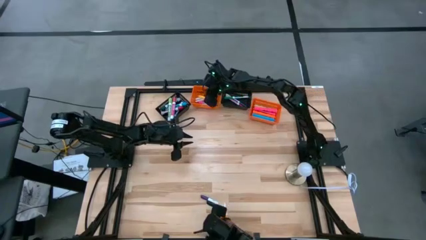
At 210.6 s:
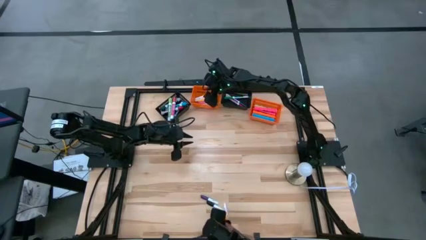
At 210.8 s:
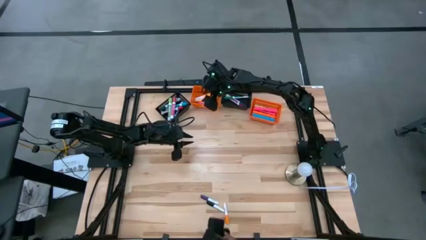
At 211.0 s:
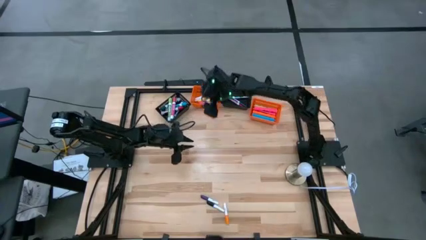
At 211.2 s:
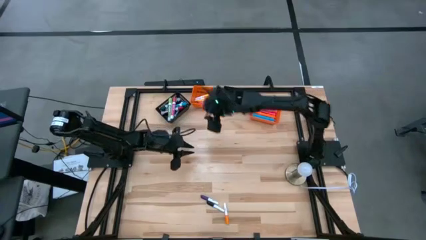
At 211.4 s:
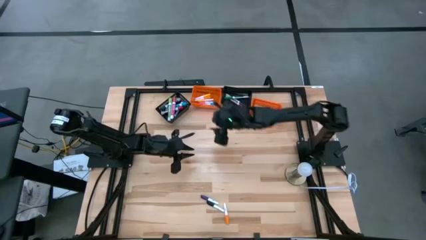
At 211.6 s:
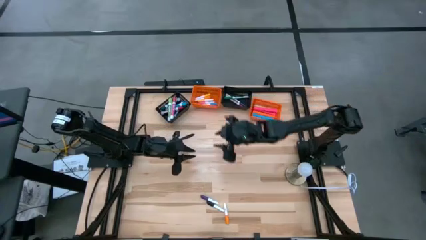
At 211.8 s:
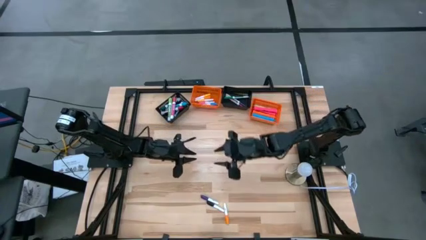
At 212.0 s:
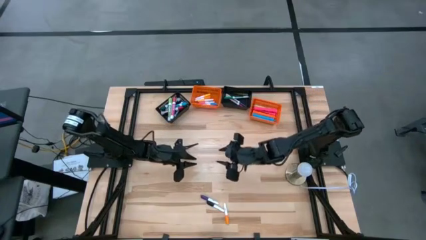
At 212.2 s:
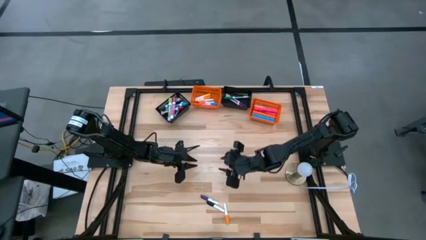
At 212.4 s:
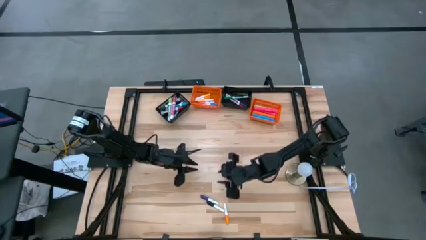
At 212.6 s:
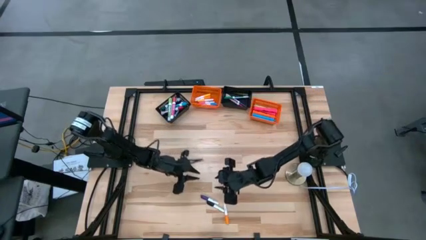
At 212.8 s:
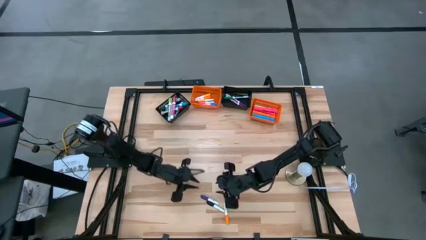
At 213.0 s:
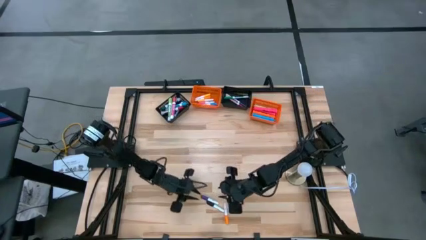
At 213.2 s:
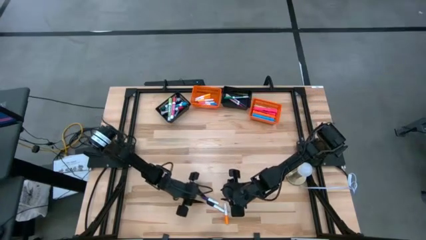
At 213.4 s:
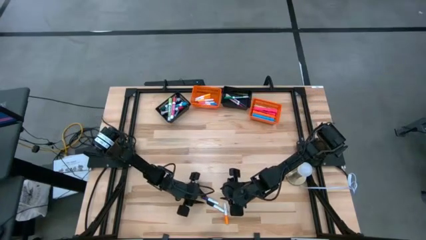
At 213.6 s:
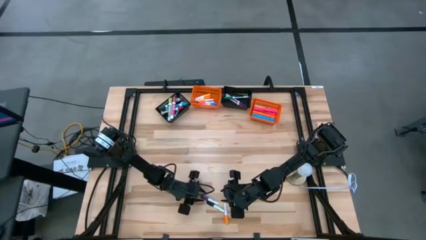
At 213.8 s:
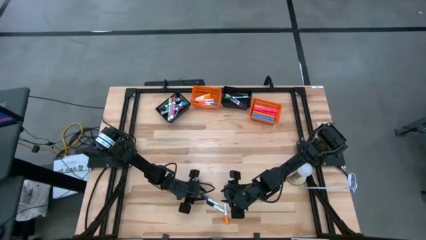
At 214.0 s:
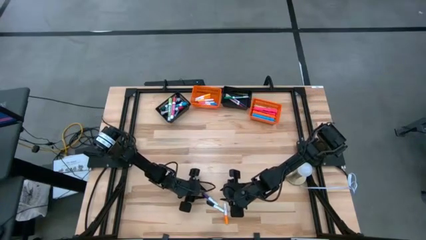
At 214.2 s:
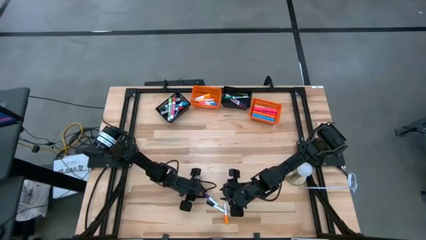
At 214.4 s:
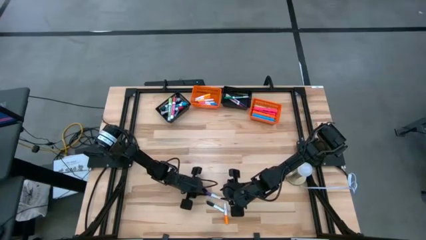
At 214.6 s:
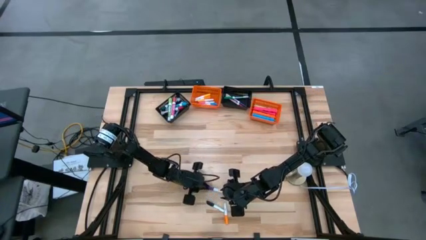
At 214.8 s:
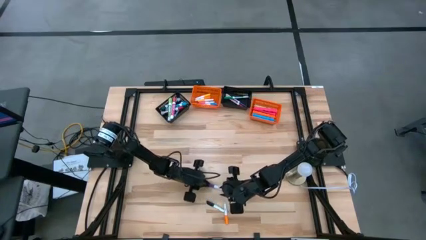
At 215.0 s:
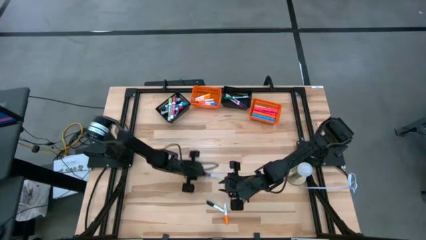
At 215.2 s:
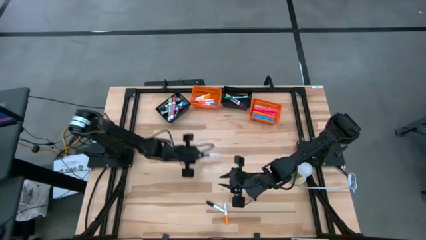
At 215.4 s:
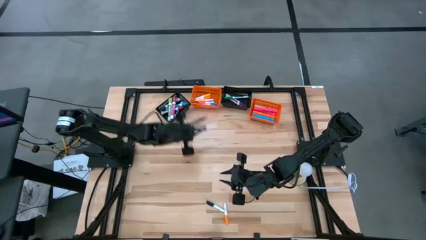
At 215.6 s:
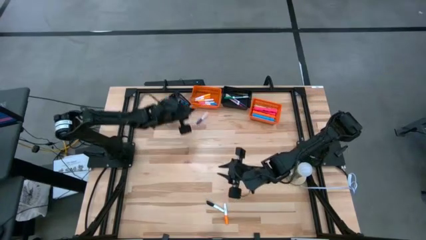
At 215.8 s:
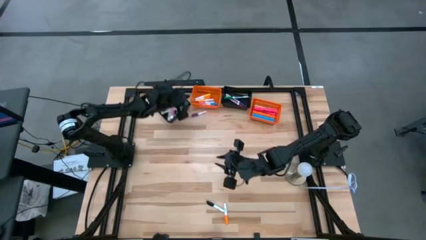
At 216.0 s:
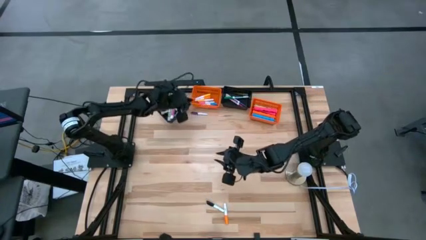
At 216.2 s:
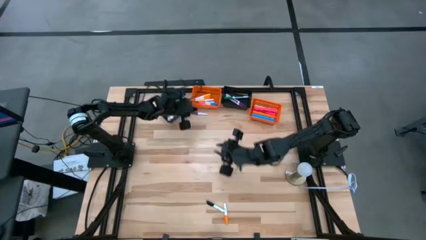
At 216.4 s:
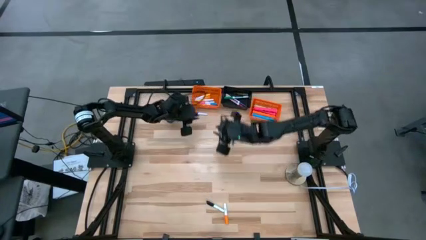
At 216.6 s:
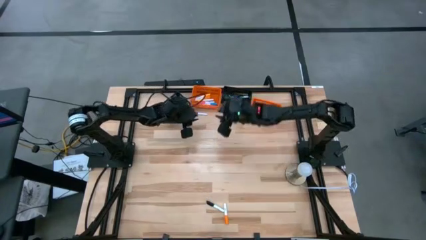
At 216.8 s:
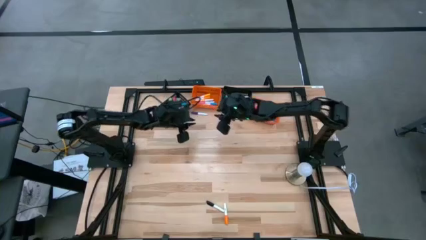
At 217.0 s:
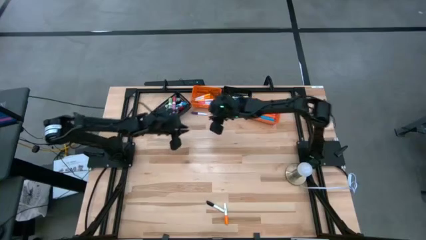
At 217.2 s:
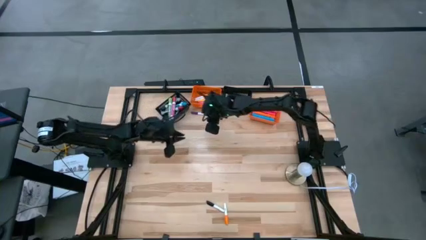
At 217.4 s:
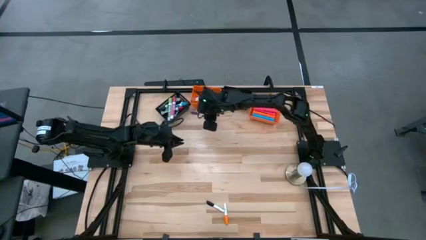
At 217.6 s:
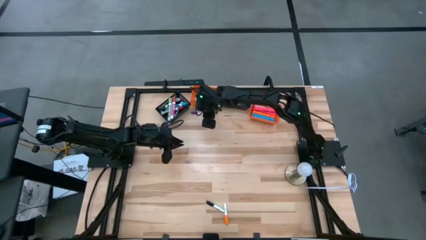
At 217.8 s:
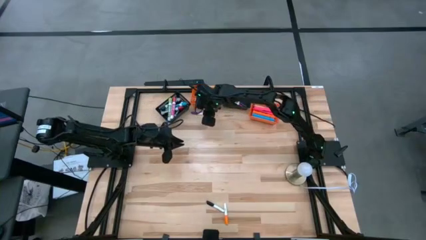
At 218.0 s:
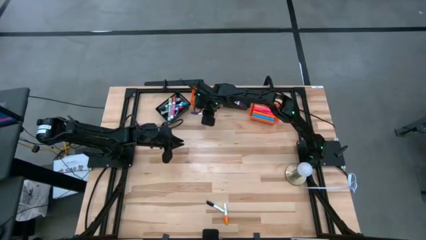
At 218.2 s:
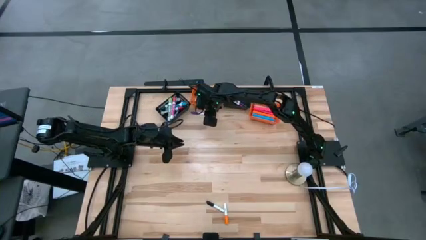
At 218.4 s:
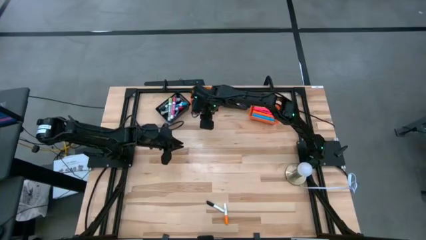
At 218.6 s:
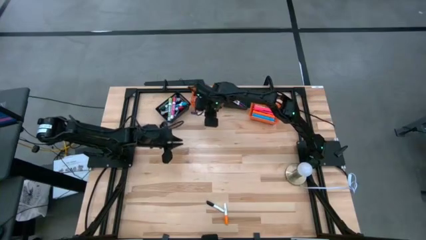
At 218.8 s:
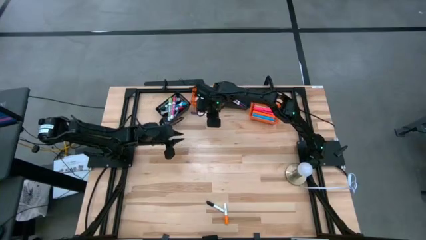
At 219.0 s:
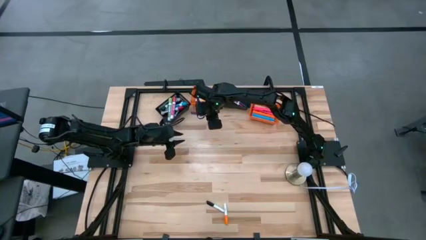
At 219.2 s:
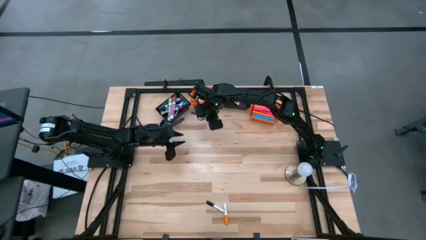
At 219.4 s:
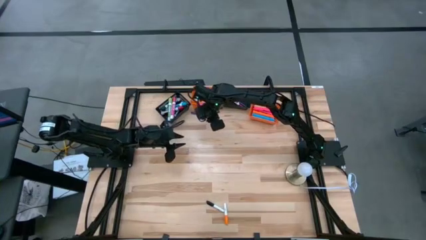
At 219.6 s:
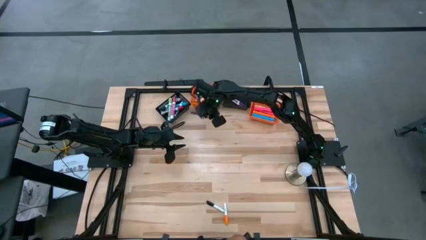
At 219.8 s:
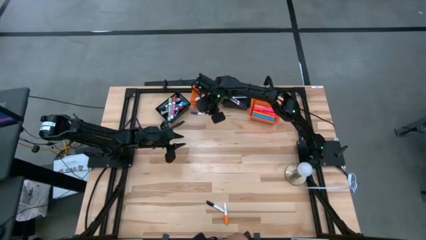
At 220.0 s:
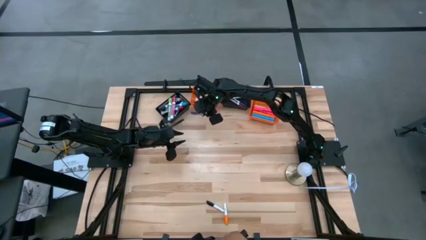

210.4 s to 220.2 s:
Task: Pick & Place Markers
Put the small purple highlighter into the left orange bin

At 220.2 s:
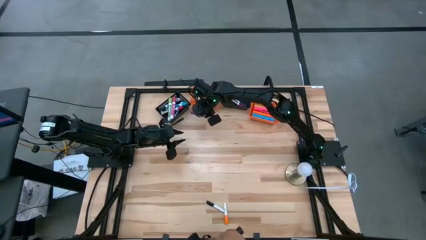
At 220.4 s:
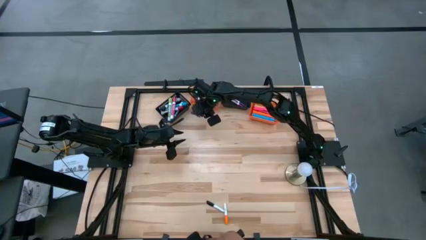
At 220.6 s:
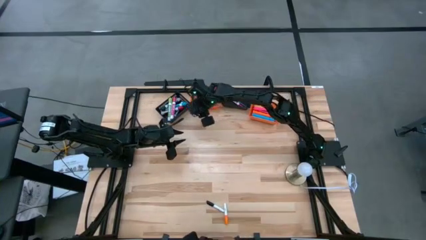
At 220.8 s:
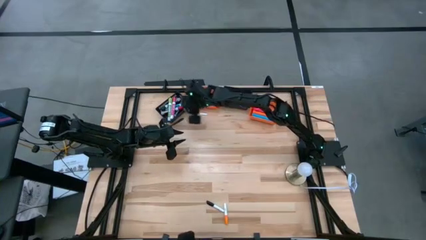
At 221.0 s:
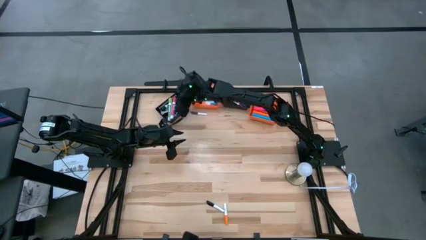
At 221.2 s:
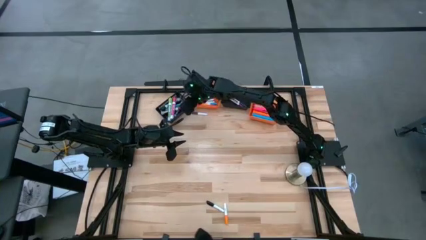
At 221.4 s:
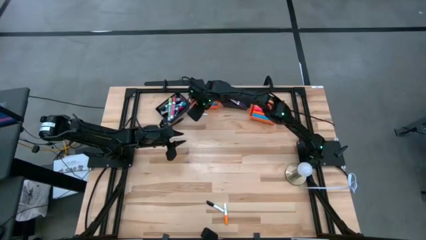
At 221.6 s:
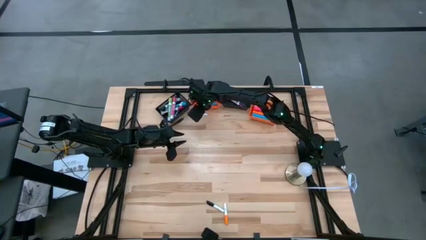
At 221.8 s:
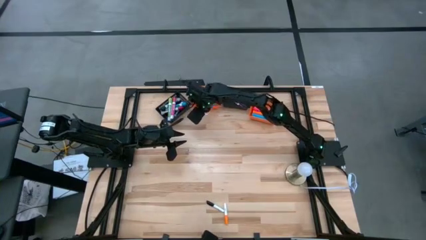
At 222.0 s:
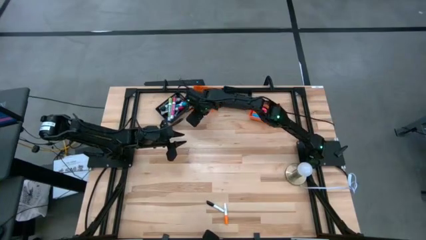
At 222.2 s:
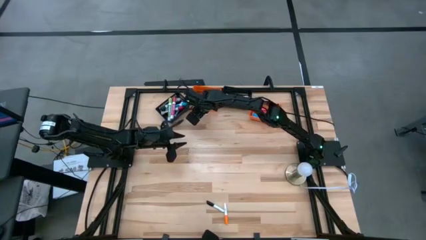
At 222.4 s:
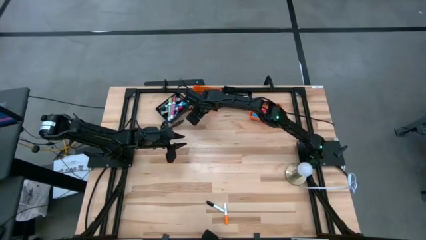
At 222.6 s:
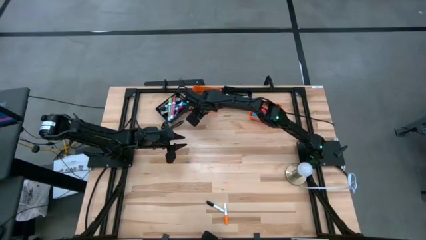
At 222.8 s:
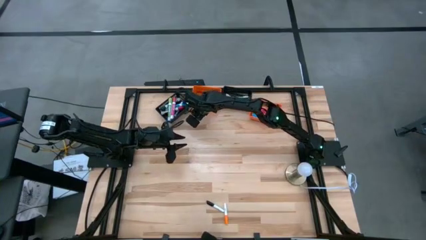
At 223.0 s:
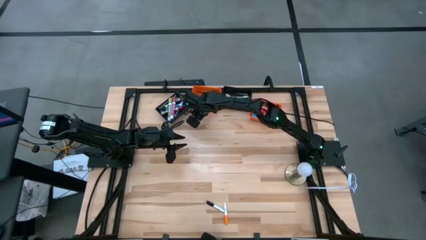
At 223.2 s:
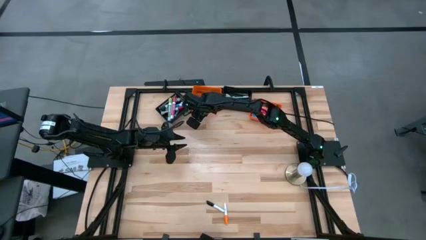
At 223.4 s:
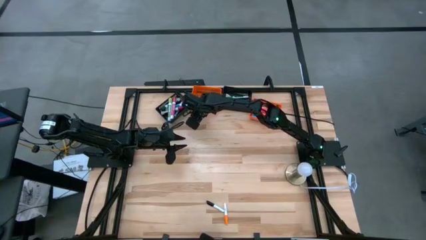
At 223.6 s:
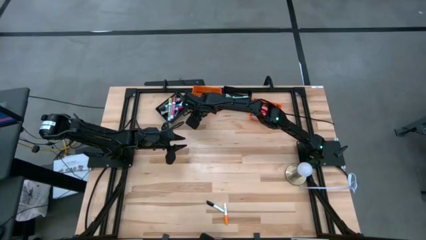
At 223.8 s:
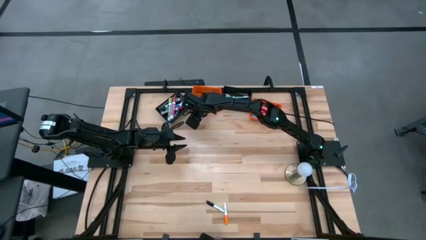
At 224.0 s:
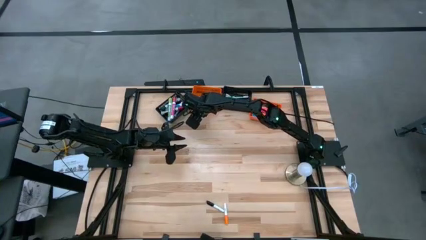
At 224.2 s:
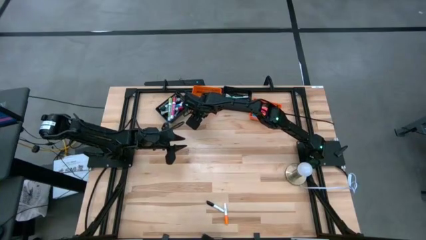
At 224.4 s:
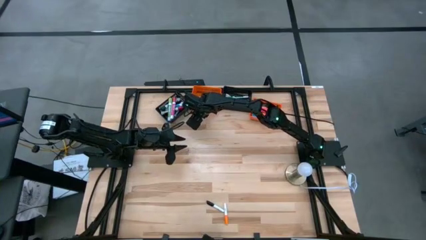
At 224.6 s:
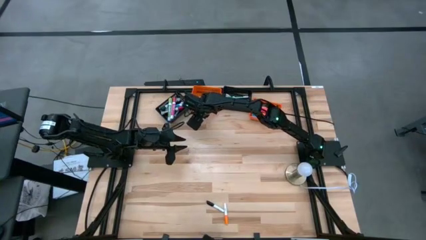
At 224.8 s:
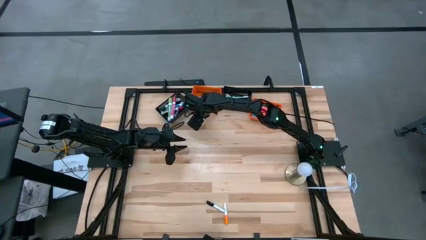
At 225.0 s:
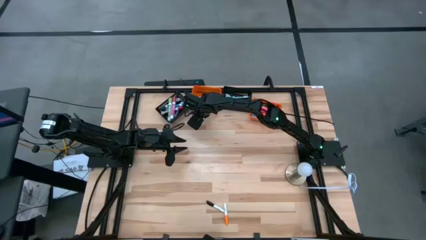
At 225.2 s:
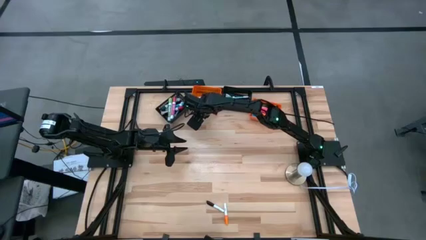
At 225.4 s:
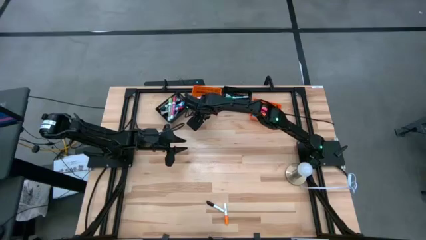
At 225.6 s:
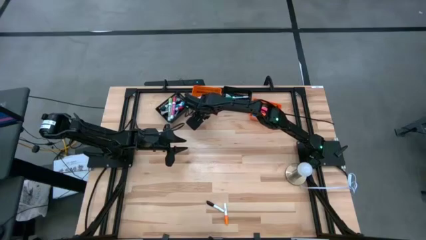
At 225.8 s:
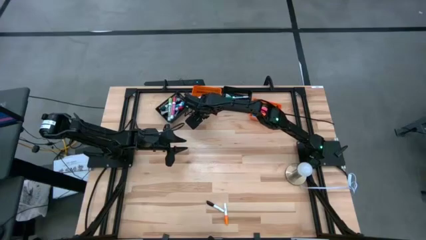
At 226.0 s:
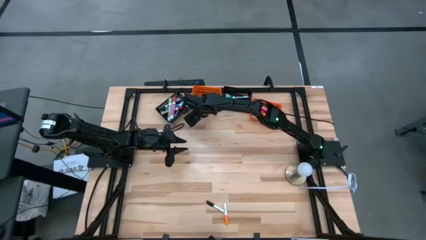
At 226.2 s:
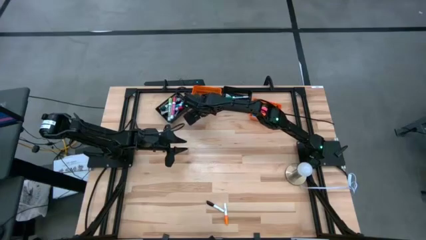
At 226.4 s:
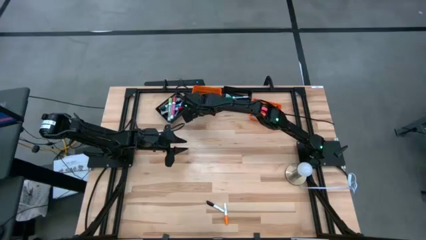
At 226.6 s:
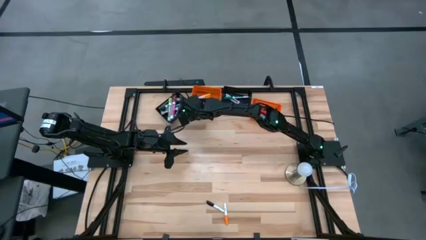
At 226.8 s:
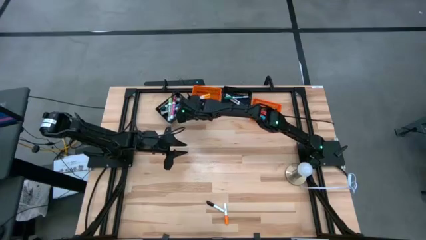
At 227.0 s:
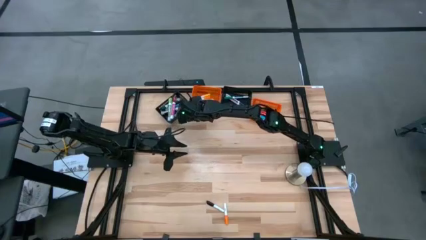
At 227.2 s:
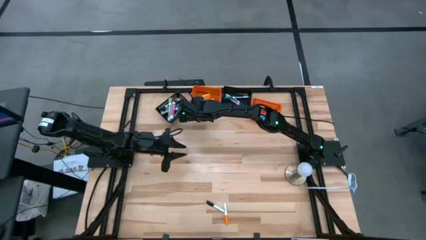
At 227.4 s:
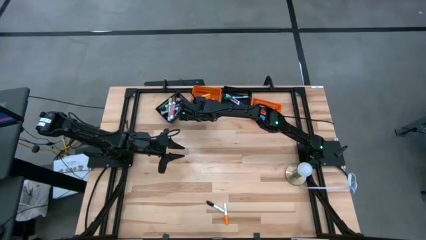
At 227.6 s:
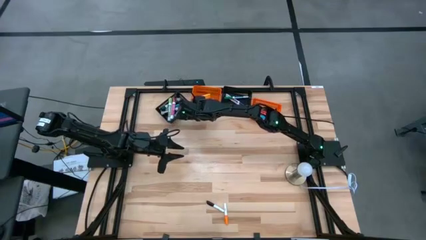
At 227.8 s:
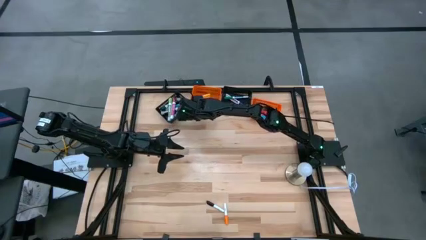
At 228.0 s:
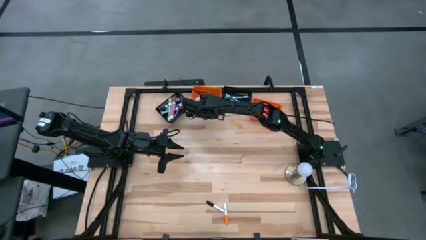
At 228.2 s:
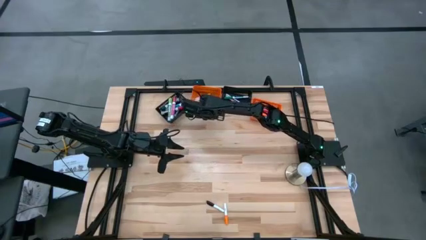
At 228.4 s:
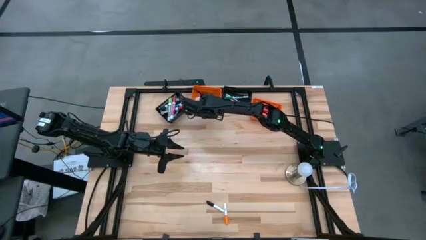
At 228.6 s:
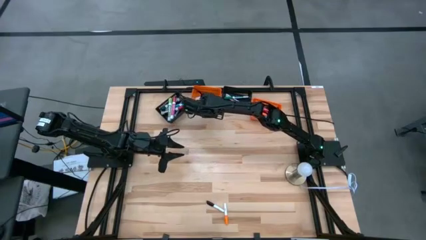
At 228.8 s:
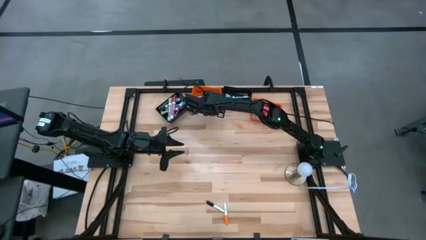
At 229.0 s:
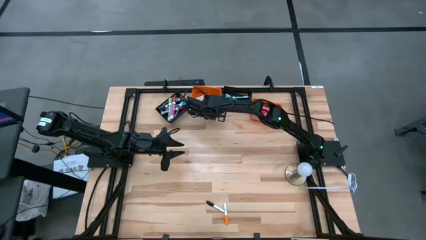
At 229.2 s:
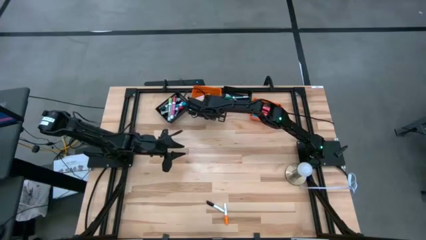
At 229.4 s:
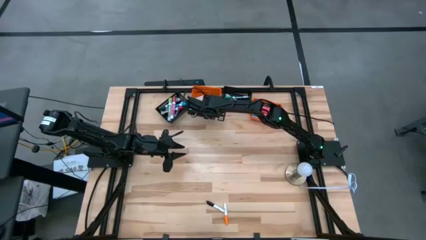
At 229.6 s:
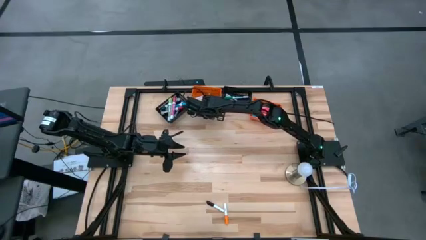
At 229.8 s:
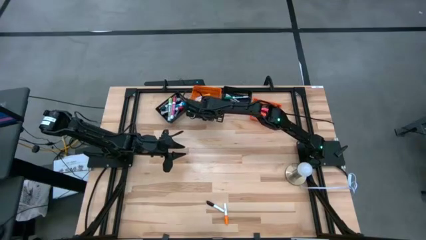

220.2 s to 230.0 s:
Put the small purple highlighter into the left orange bin
